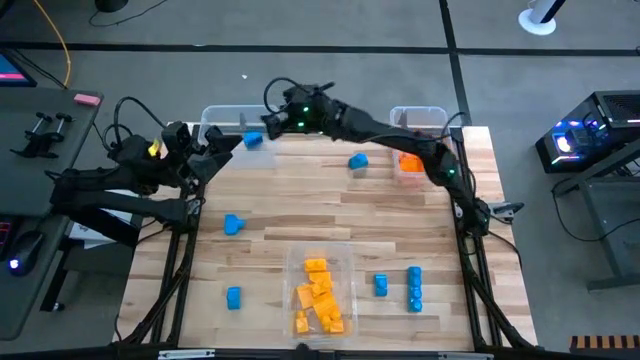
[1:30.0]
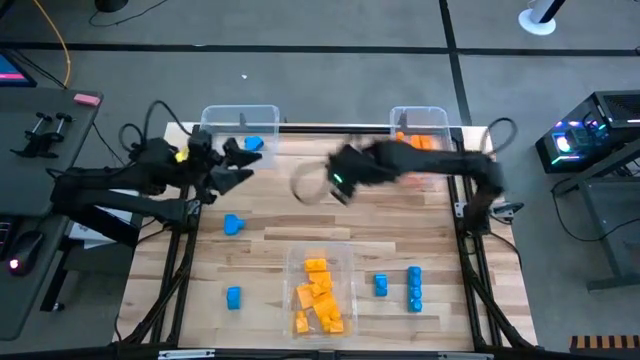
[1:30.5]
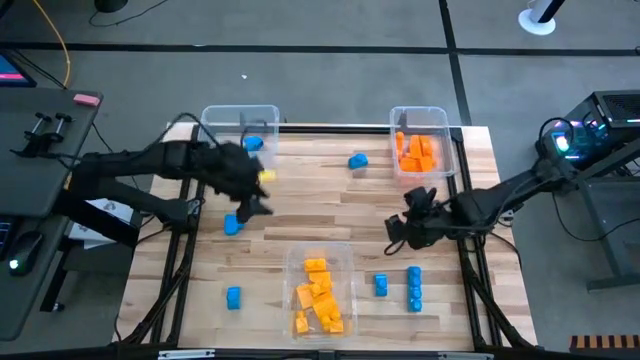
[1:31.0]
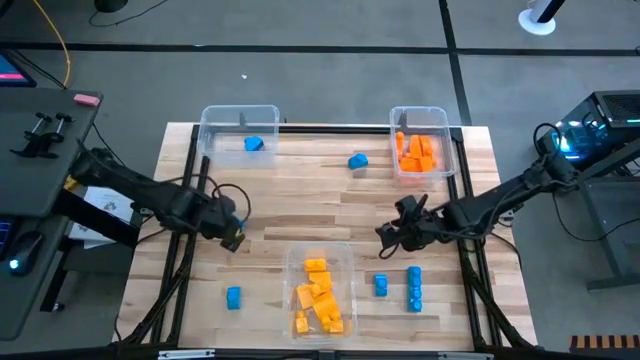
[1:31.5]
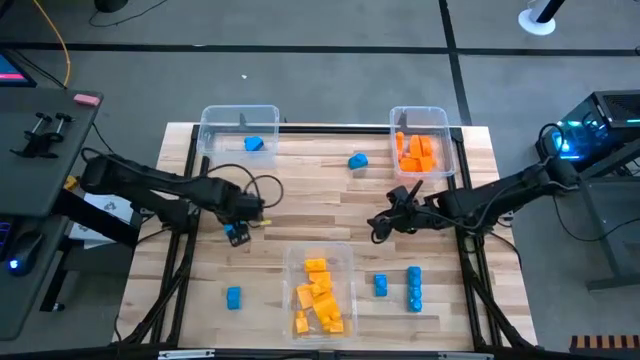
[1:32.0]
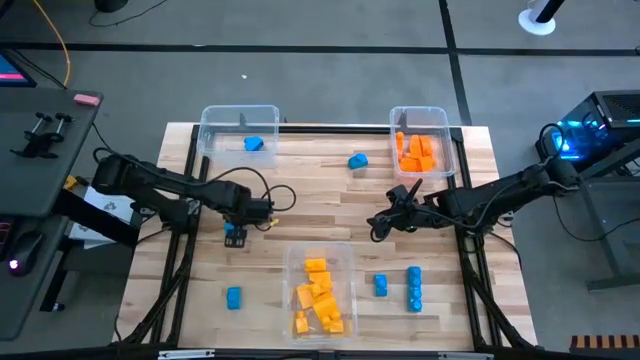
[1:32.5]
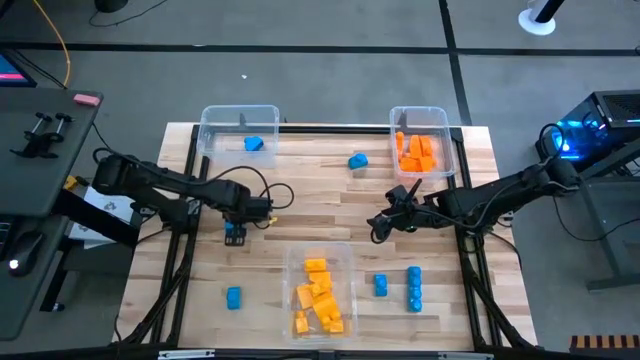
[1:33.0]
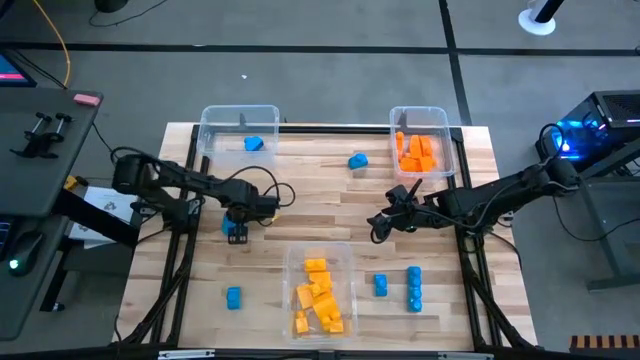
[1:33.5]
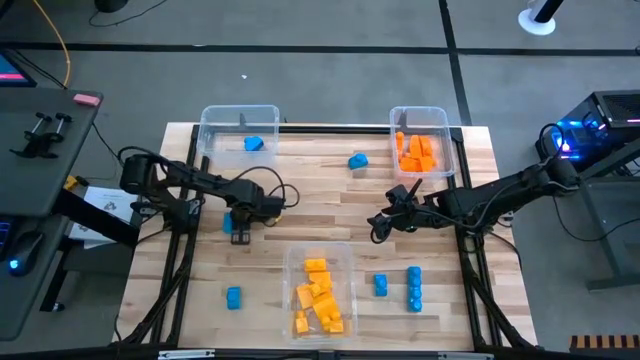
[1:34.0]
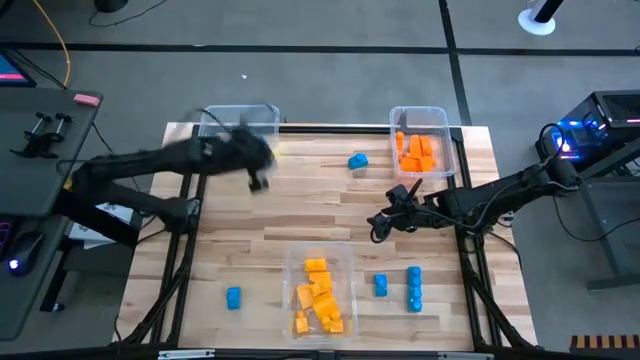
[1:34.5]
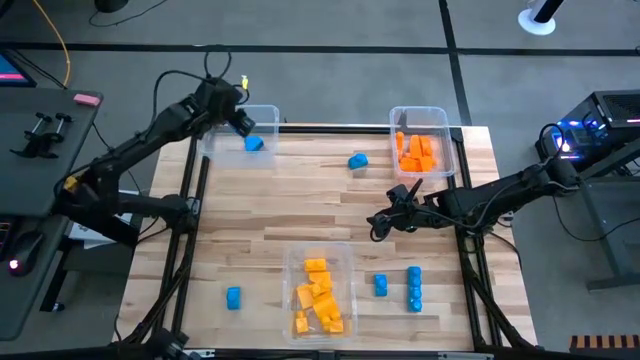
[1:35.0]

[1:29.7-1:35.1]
Task: Sort blocks
Put the blue game piece into the top left transparent bin

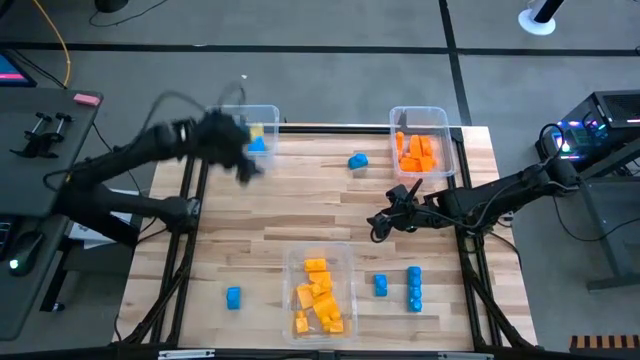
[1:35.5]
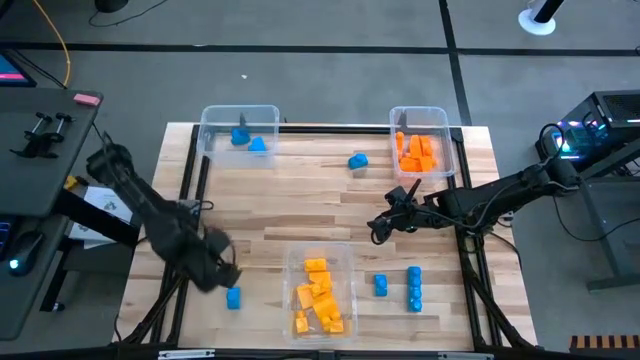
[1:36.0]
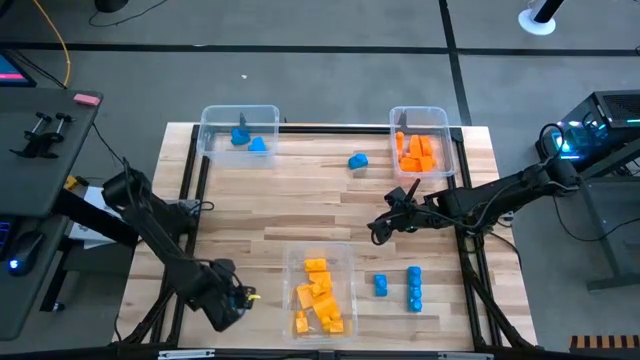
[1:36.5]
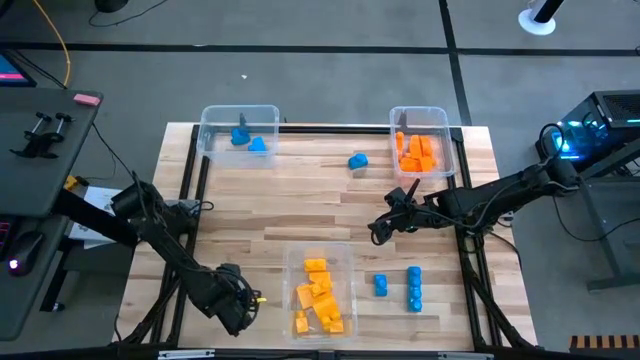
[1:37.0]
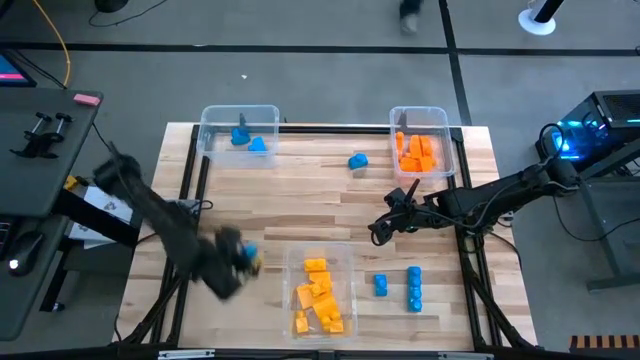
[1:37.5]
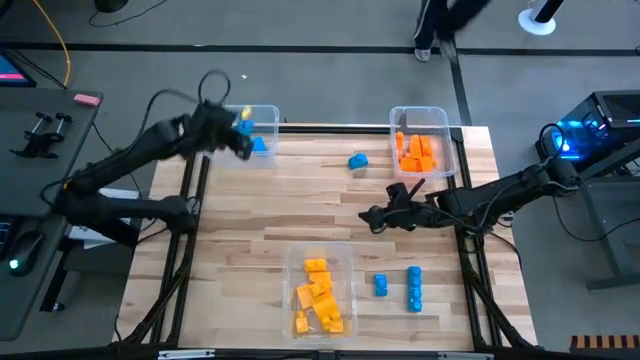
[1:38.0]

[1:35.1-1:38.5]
Put the blue game piece into the top left transparent bin

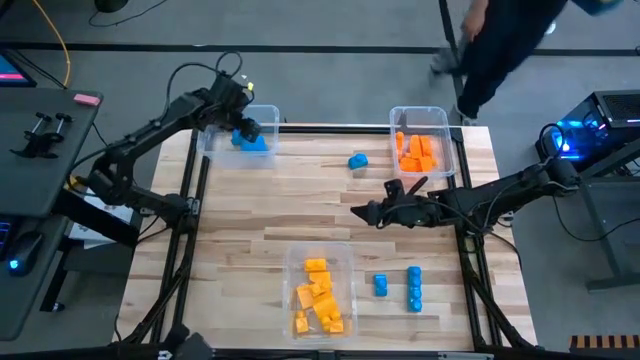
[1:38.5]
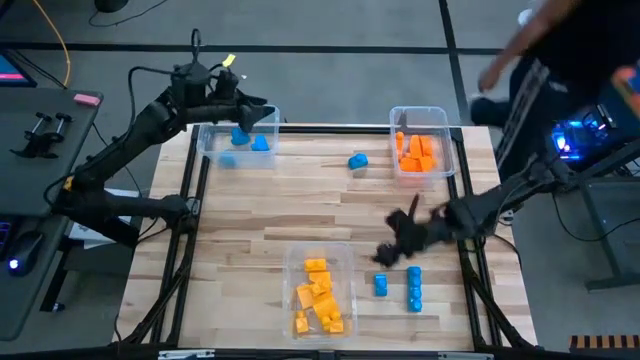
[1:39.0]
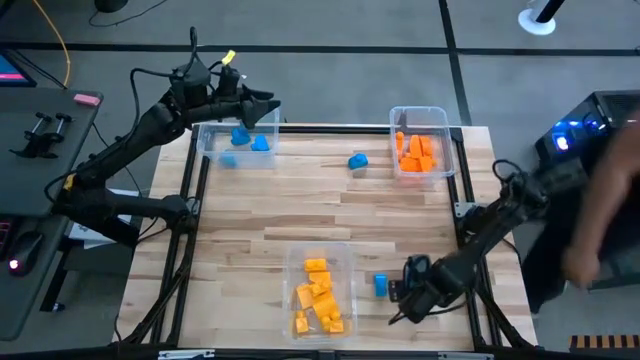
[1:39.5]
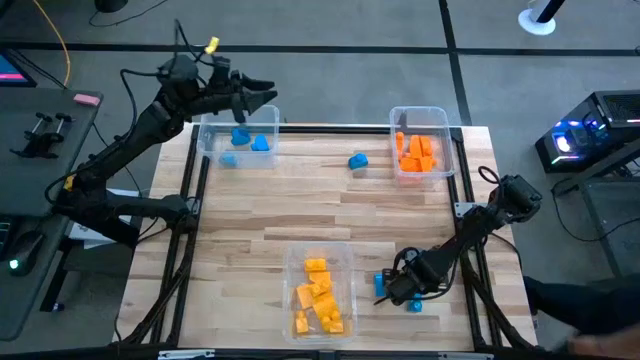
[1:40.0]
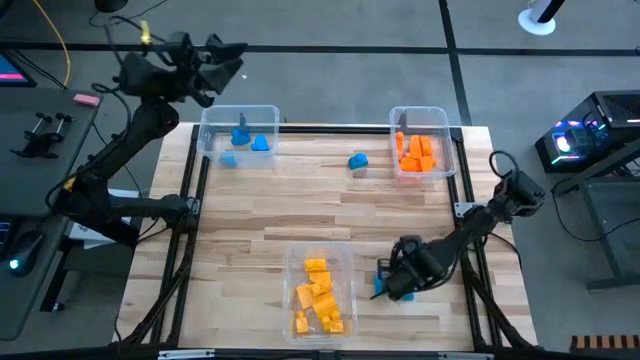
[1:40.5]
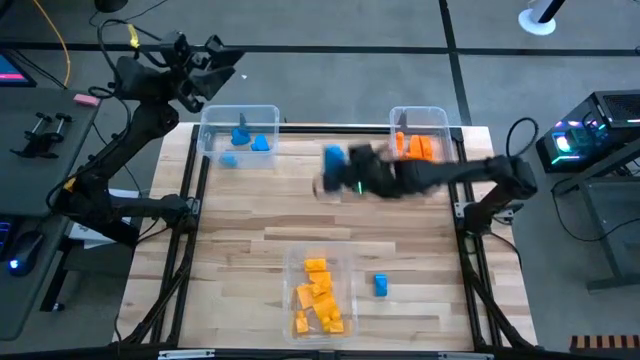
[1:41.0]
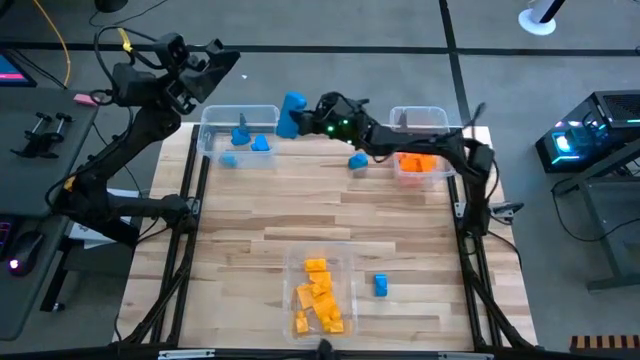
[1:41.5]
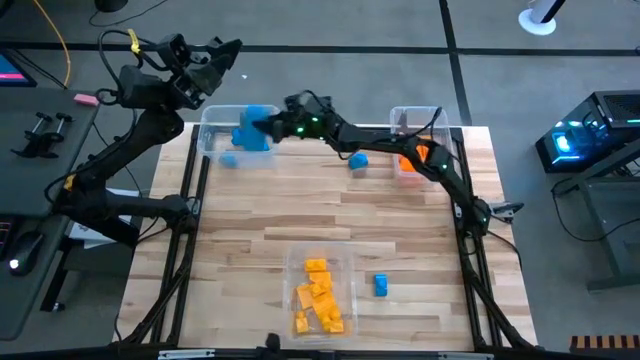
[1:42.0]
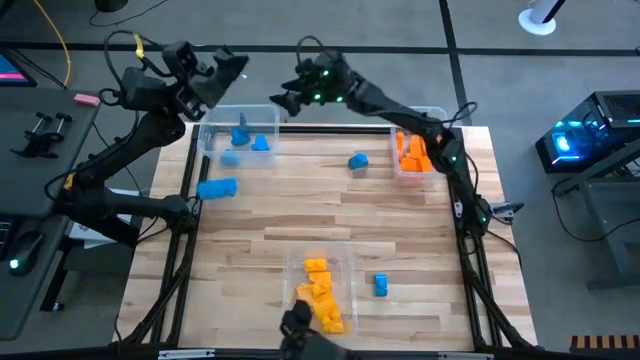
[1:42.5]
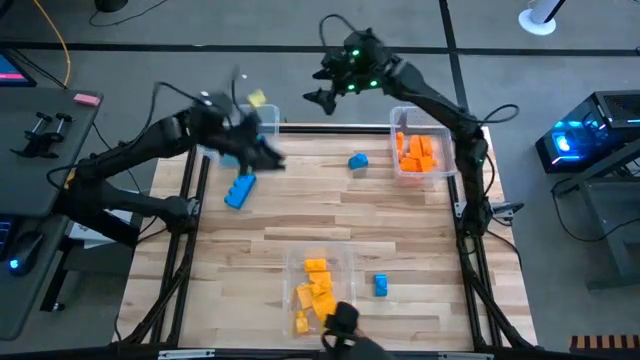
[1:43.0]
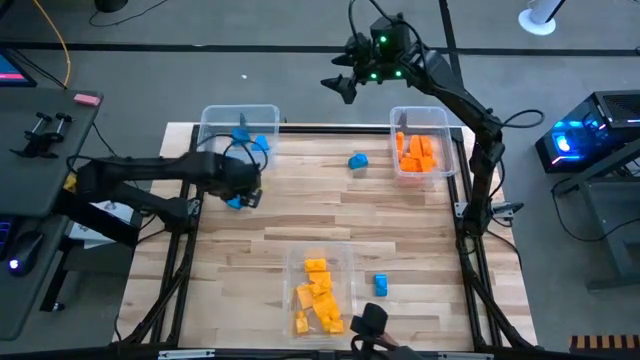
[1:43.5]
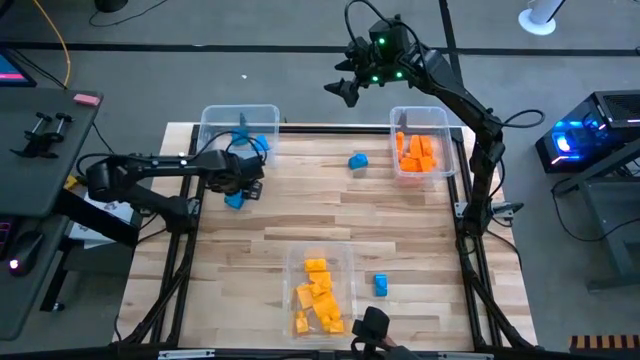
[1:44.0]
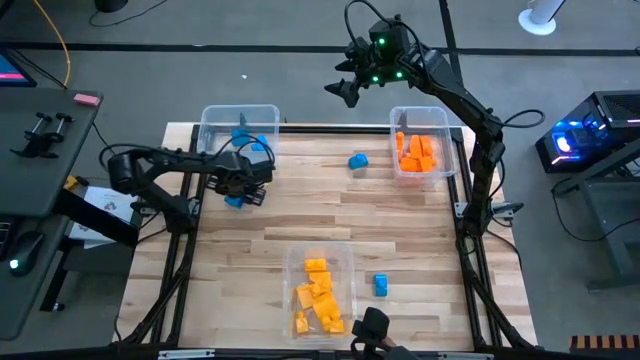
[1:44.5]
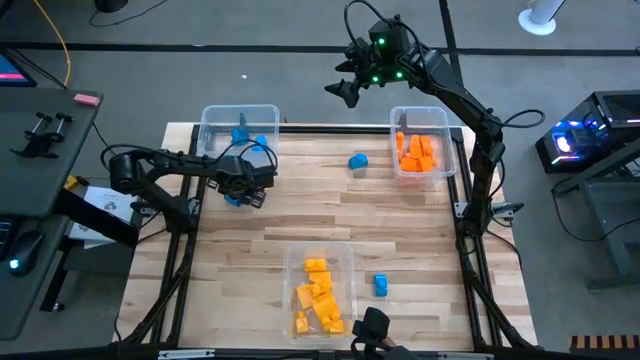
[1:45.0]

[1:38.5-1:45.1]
Put the blue game piece into the top left transparent bin

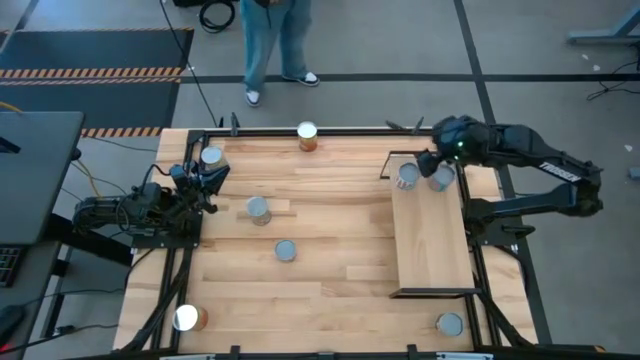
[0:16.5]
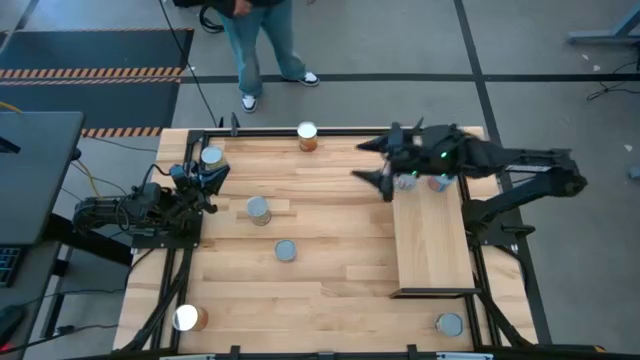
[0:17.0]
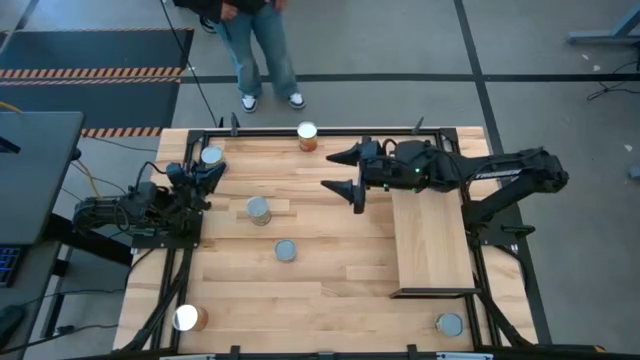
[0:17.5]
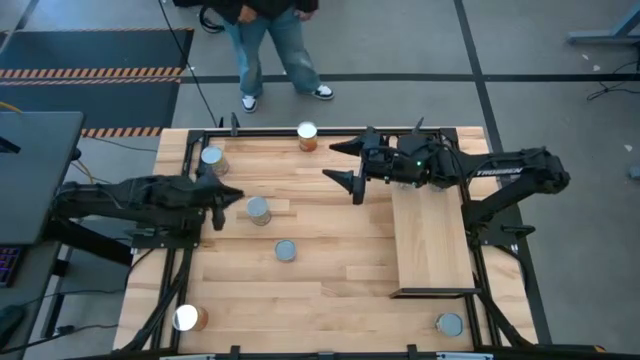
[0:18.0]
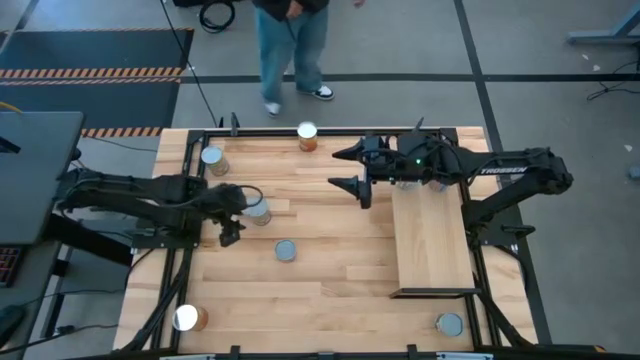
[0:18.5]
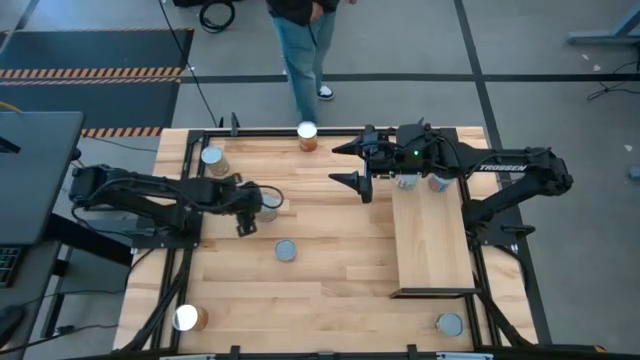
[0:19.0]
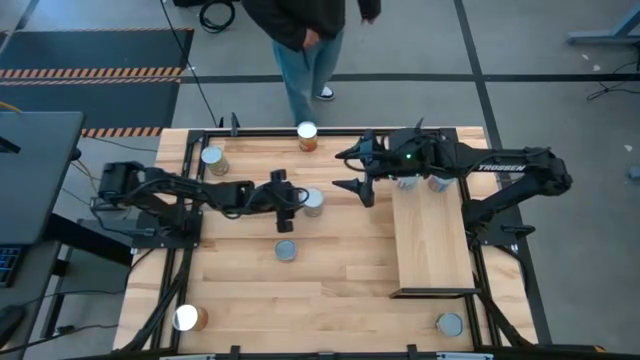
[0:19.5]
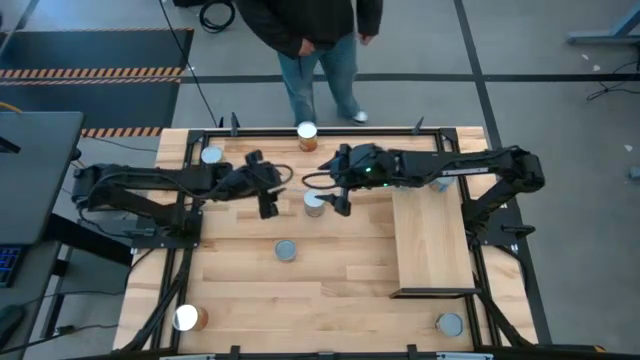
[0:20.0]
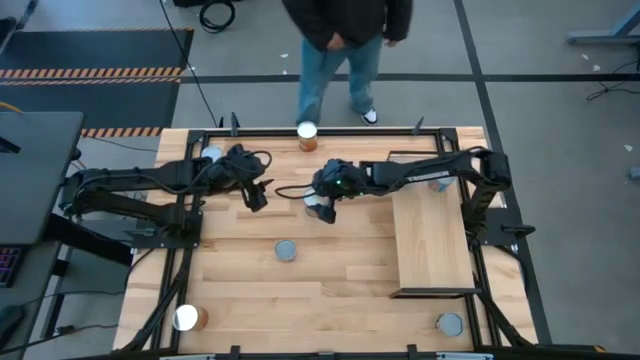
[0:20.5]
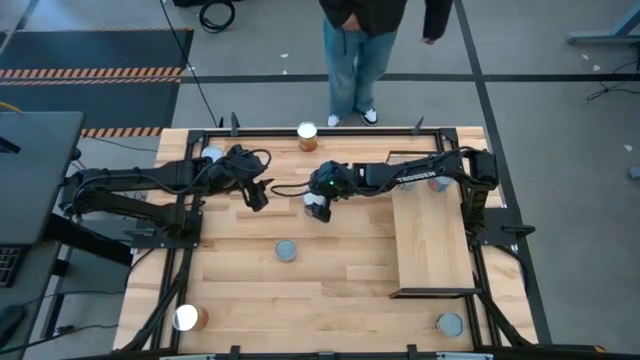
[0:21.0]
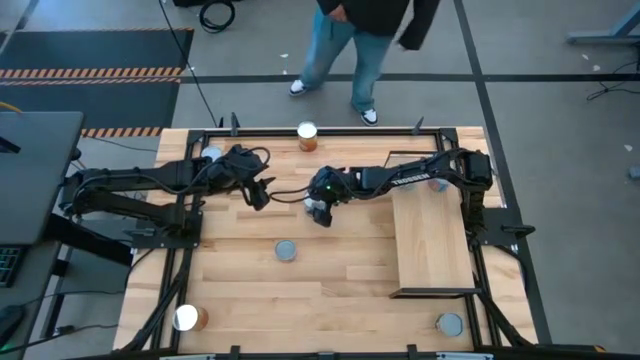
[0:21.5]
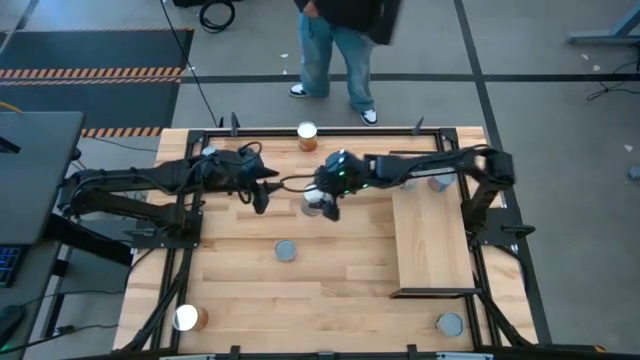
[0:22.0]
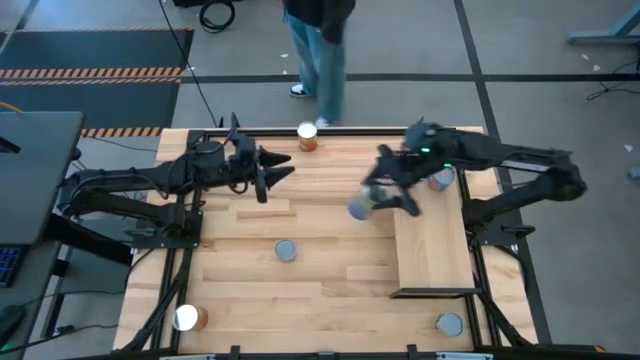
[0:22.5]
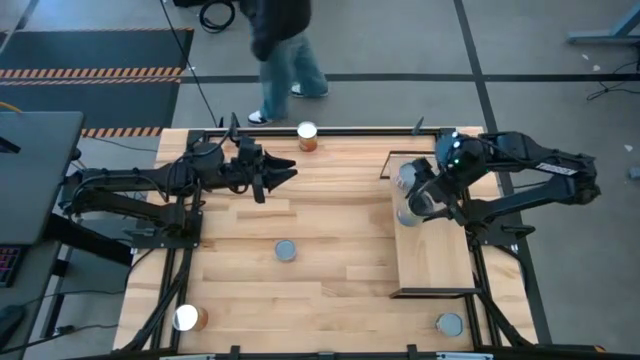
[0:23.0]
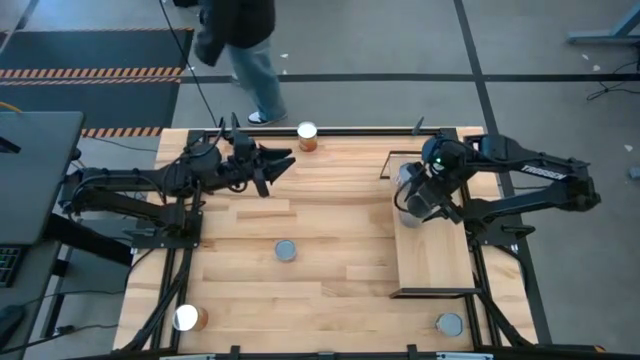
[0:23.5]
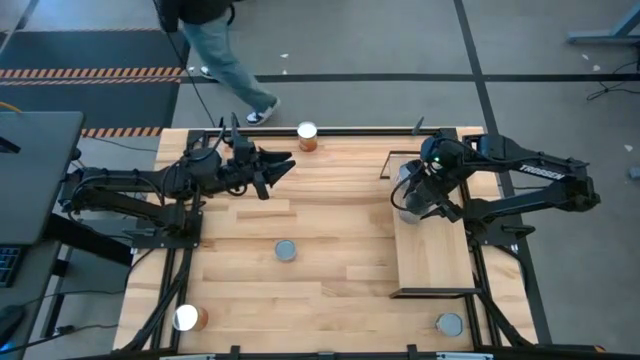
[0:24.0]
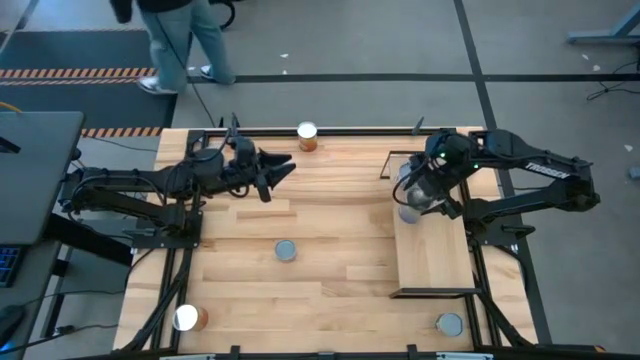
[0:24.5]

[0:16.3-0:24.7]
Task: Pick and place cans onto a shelf
Put the bottom canned peaches on the shelf
